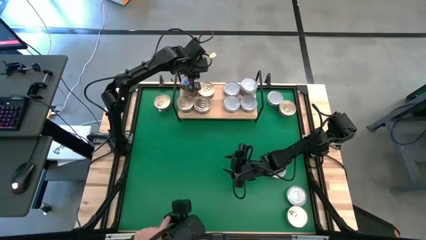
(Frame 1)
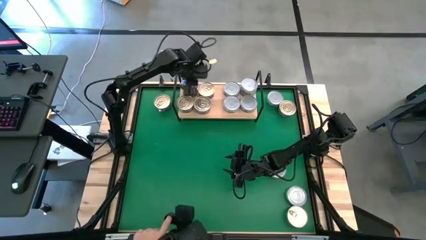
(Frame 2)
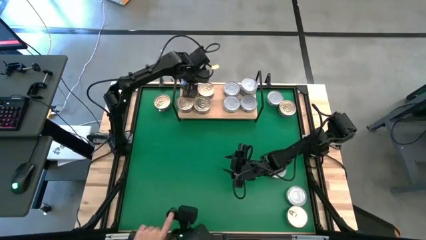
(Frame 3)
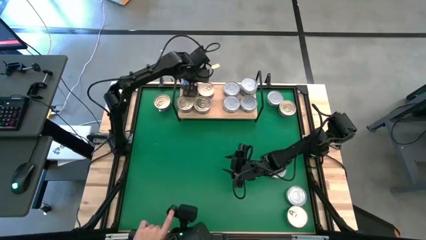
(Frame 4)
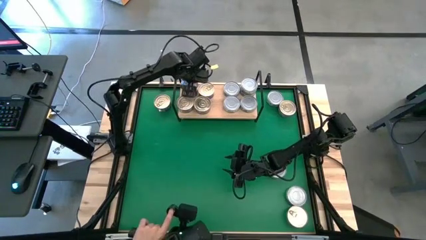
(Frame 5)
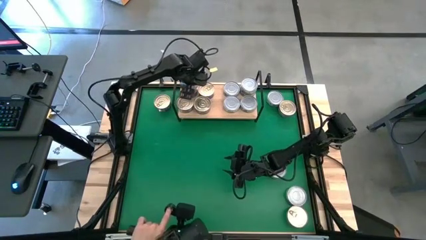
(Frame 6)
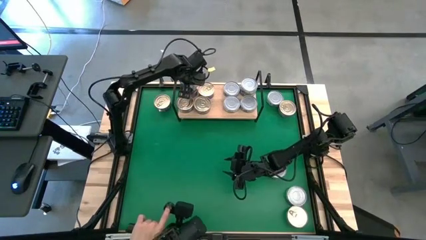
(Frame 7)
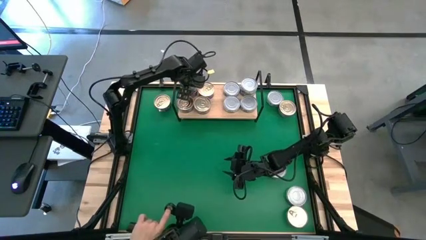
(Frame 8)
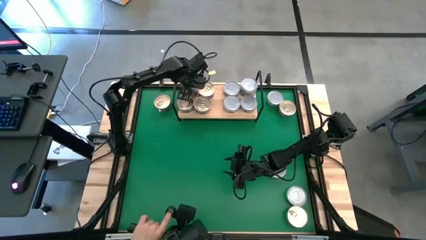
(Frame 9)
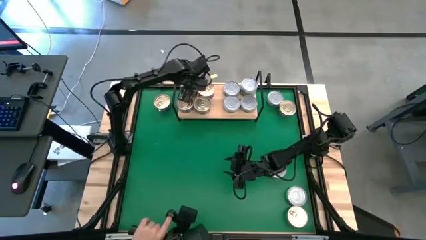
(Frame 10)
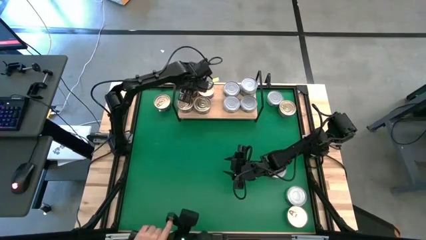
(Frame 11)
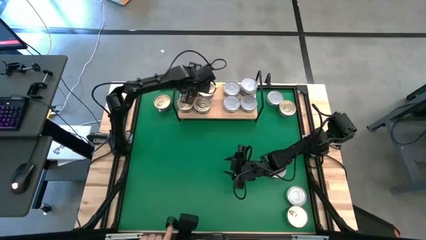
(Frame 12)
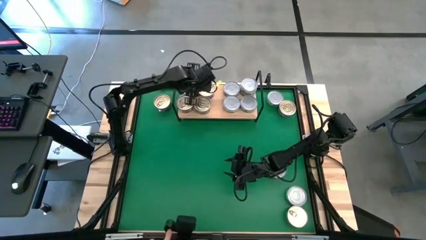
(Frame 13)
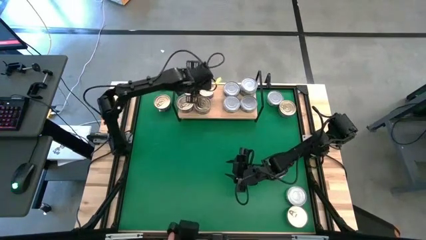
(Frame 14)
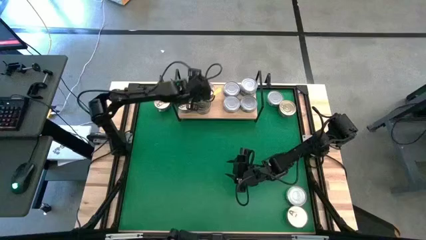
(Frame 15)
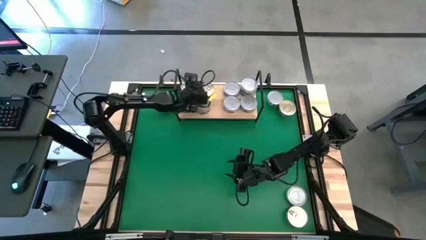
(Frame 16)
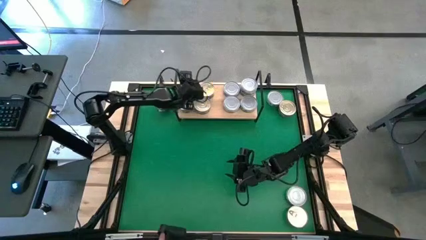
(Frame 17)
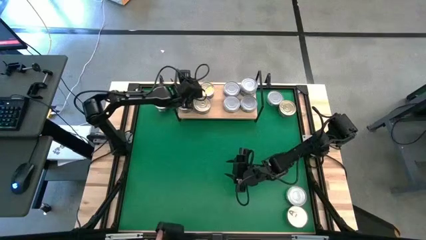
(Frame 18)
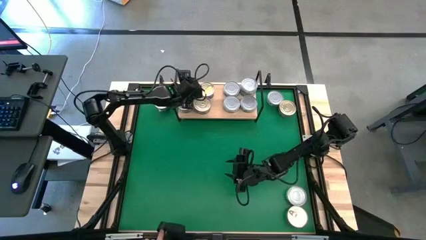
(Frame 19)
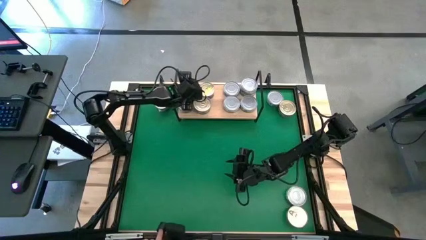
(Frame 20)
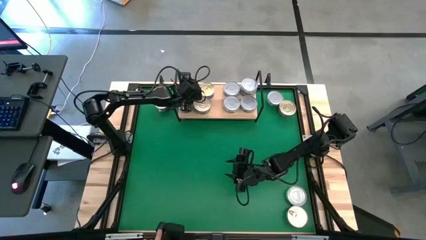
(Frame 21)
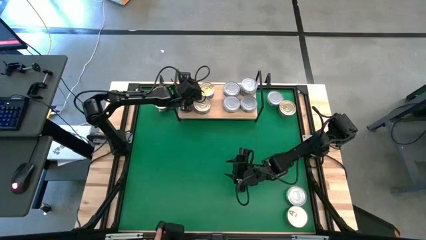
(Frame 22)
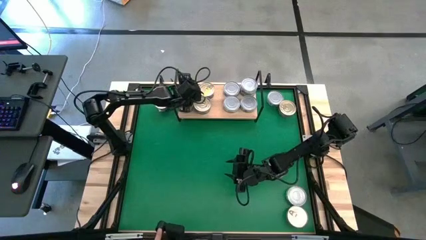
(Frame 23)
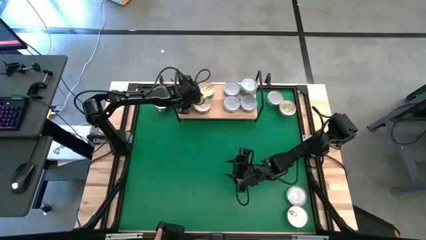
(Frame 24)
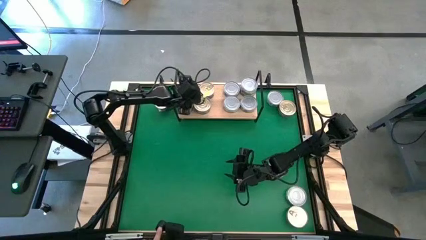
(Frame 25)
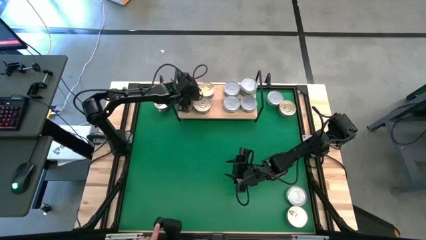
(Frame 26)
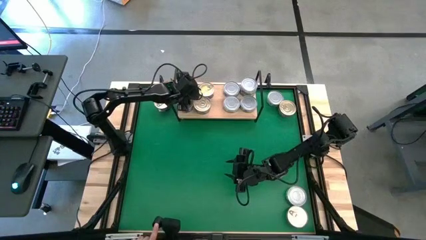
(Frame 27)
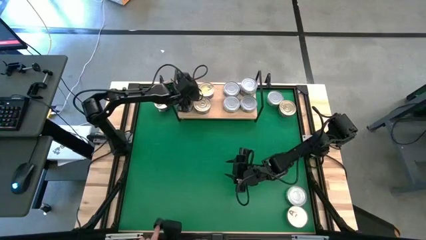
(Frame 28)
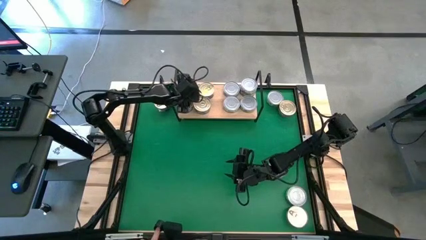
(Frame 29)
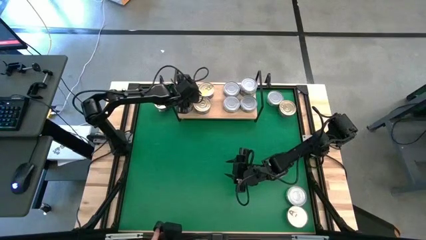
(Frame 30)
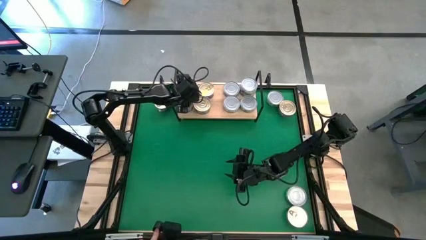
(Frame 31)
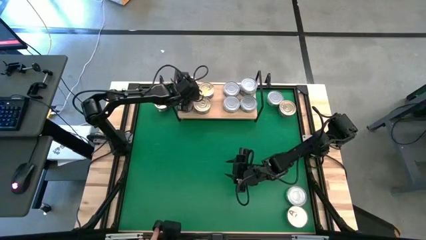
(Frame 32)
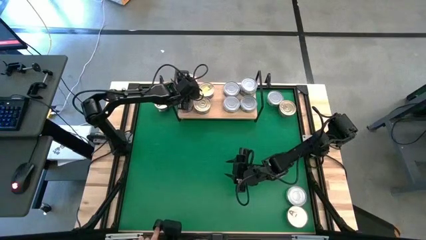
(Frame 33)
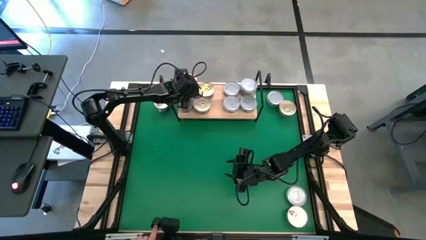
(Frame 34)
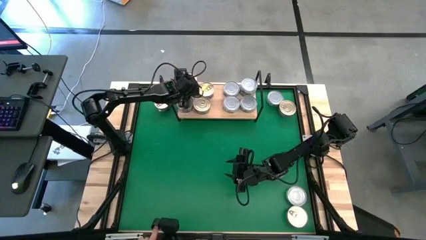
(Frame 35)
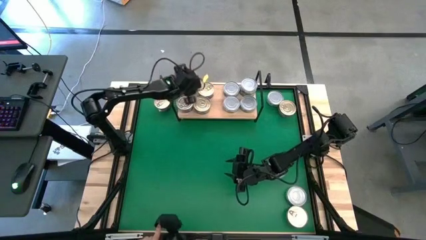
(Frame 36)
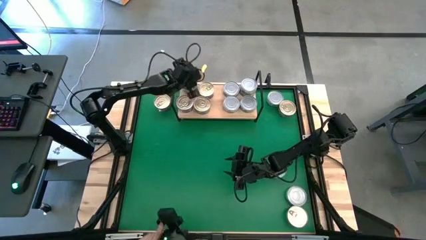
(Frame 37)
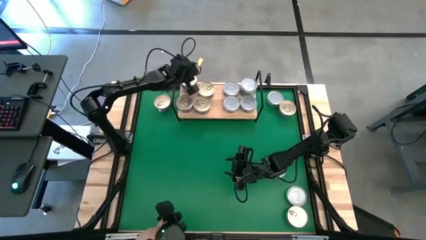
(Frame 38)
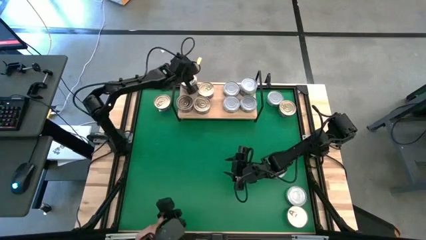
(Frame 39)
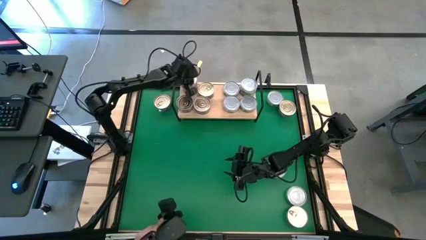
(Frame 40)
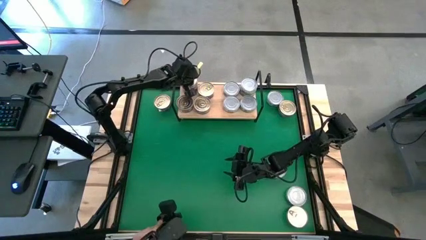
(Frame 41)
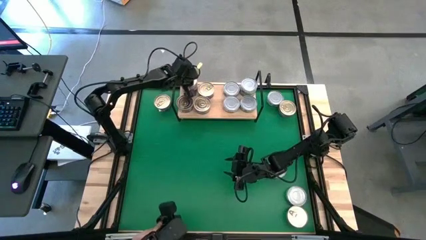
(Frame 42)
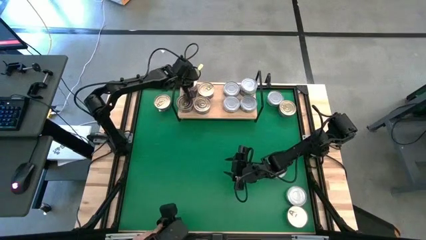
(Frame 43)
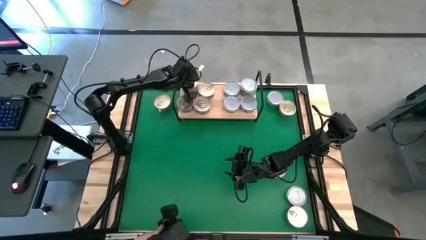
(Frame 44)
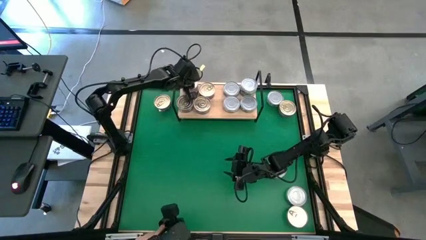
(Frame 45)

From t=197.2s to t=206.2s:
Task: Stack canned seafood by type on shelf
Stack the blue pink tuna can on top of the other blue pink tuna can on the shelf

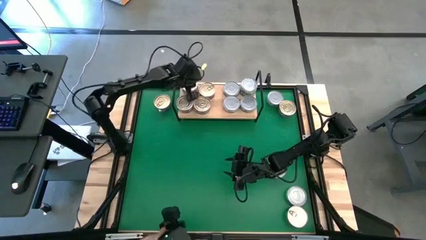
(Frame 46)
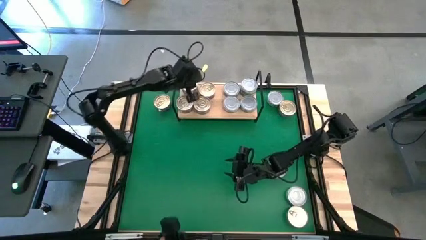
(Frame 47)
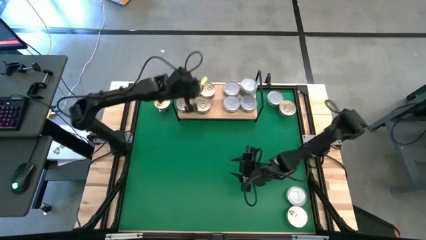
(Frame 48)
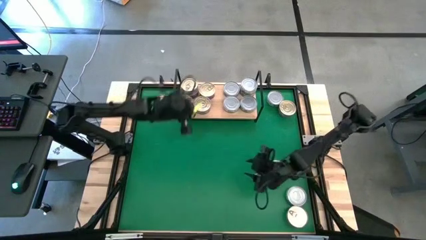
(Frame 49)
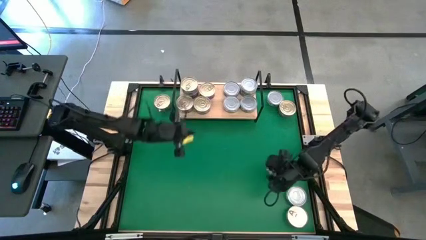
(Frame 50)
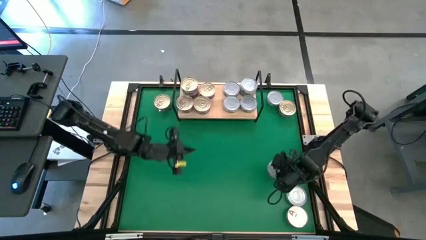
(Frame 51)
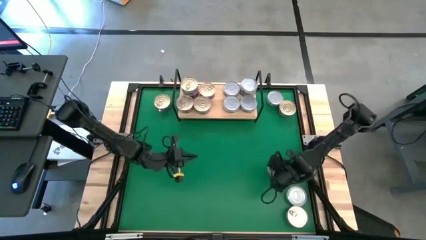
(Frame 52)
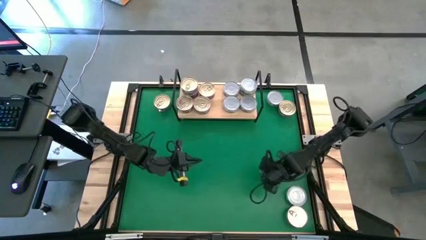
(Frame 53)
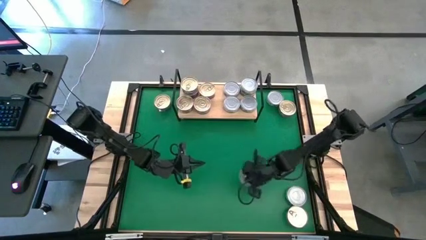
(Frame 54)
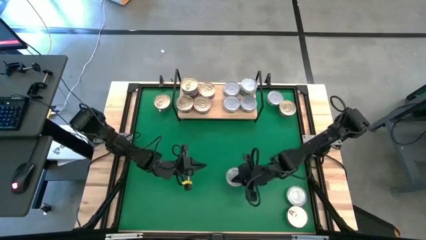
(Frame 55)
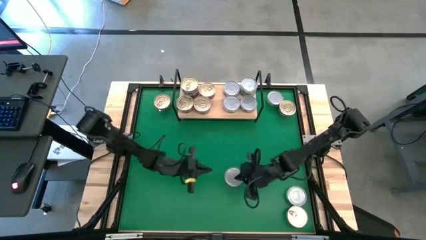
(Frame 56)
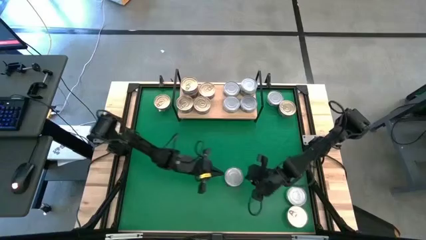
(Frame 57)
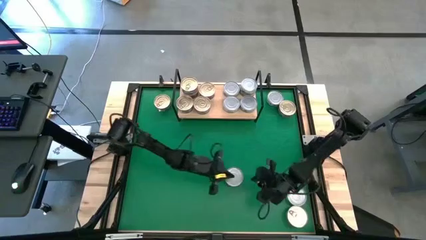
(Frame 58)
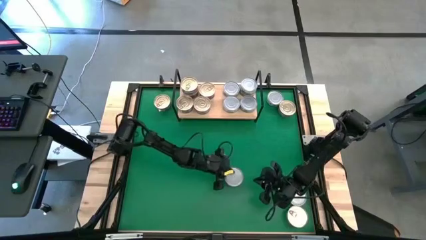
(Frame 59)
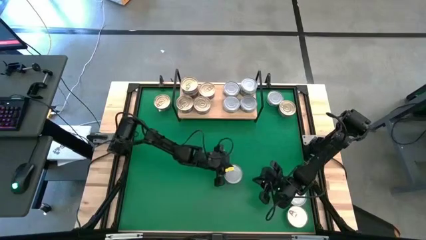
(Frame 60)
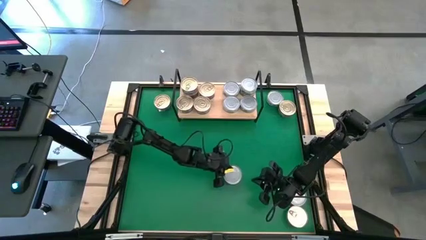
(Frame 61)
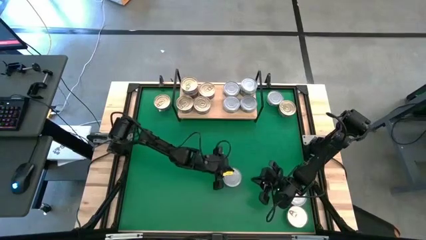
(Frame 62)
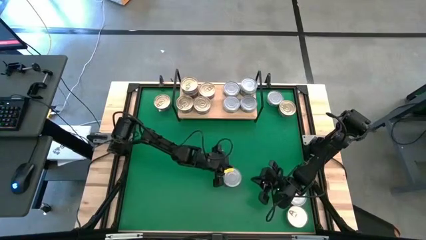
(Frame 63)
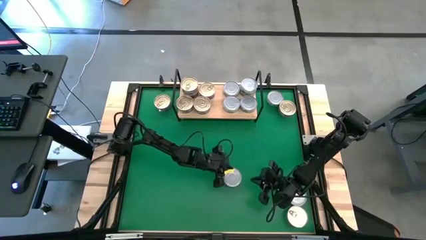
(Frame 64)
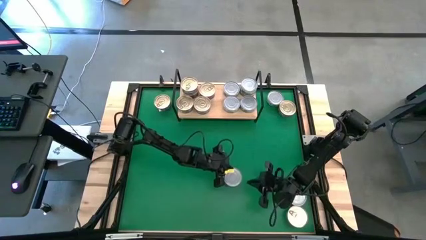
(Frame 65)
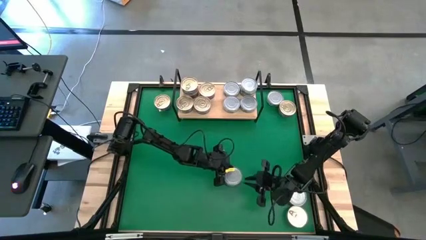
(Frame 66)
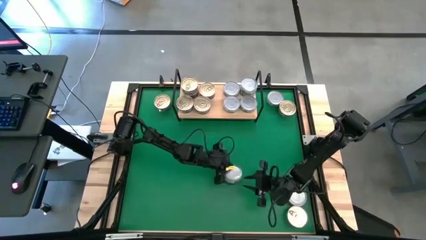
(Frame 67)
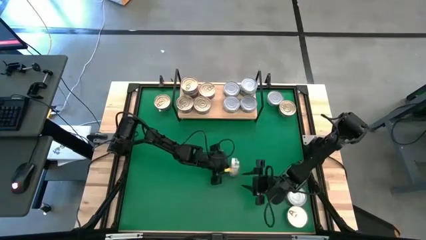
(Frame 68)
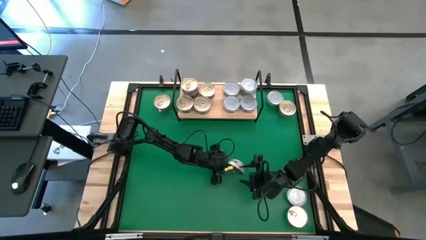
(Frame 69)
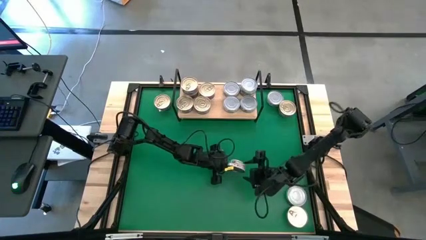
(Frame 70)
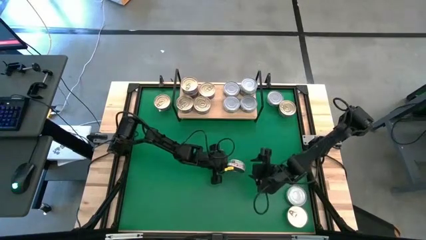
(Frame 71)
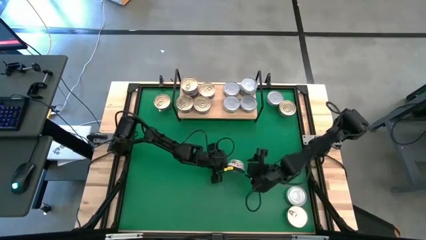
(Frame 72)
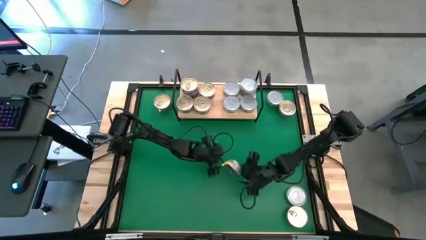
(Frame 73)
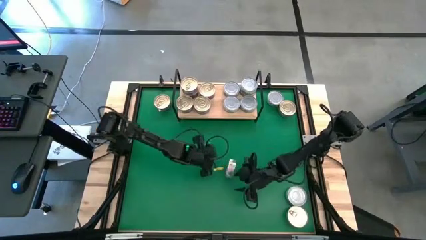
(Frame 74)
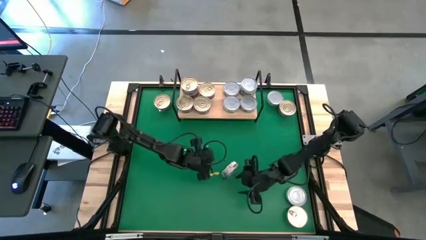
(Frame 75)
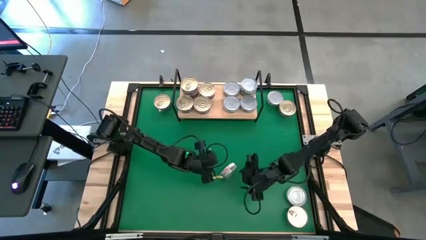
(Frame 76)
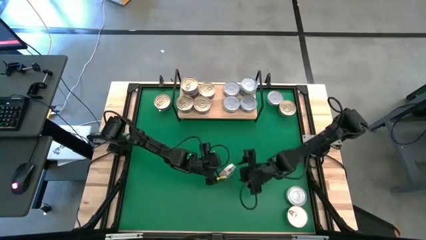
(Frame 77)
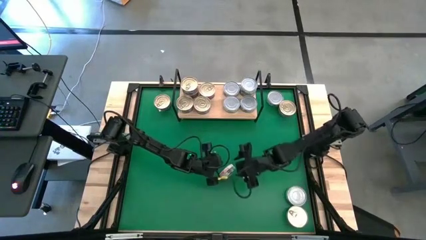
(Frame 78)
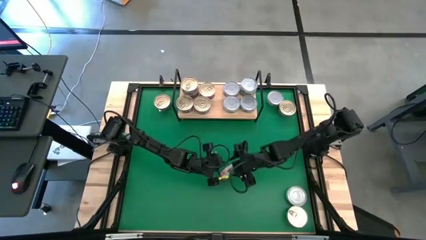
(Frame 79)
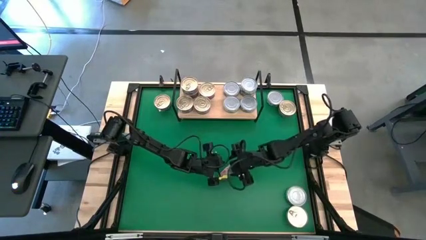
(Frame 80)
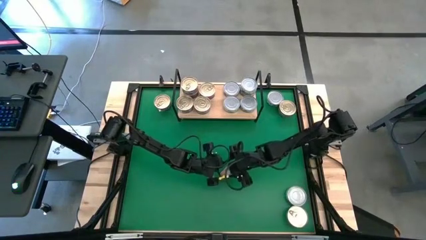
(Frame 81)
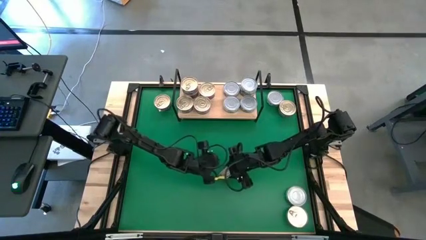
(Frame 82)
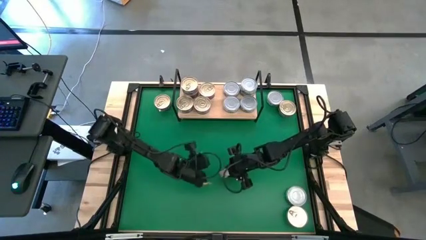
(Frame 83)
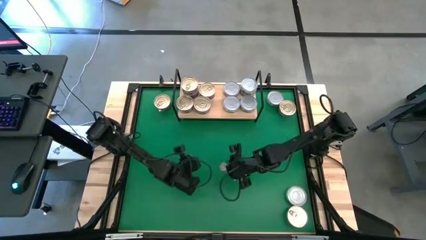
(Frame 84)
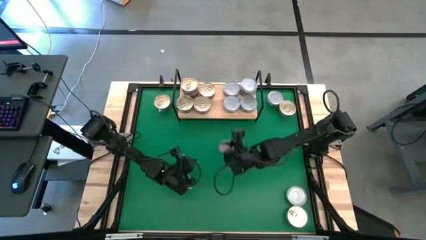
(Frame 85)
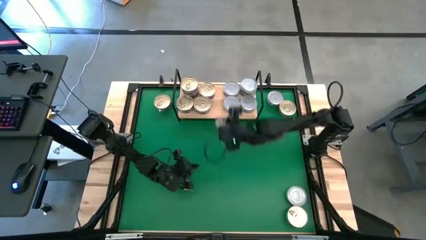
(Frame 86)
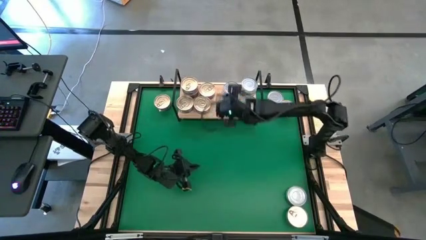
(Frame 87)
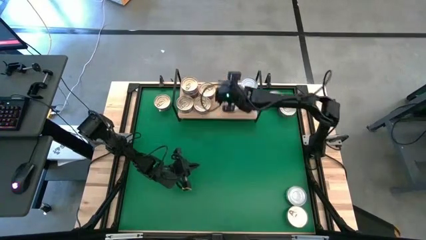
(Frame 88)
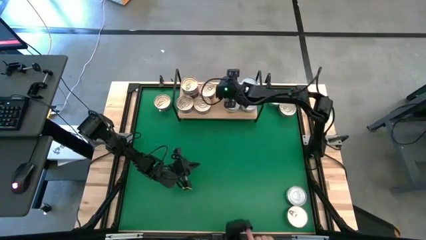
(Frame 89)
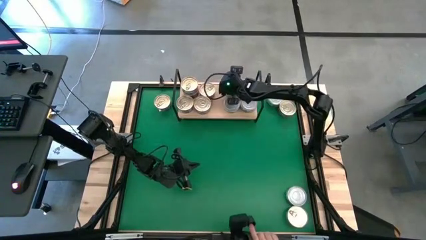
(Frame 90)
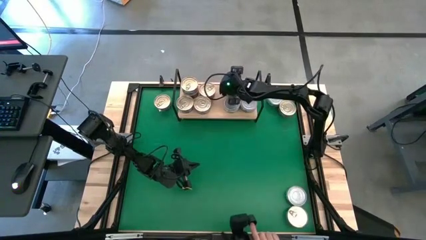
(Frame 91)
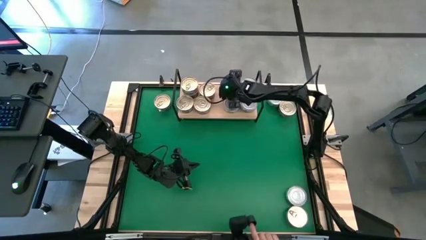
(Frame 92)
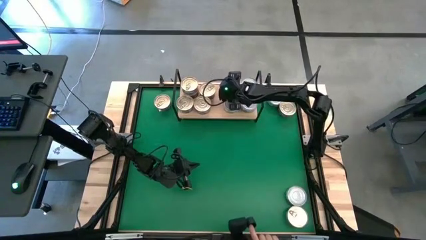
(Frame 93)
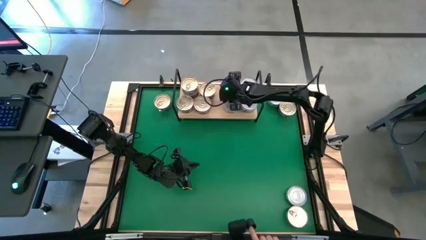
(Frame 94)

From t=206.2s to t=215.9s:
Stack the green white tuna can on top of the other green white tuna can on the shelf
